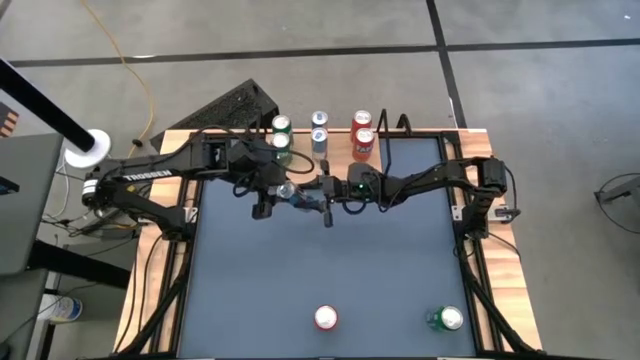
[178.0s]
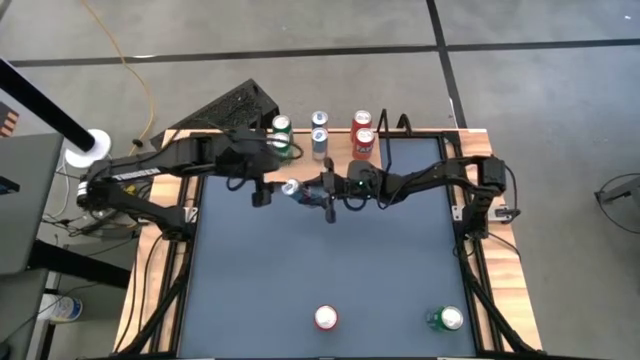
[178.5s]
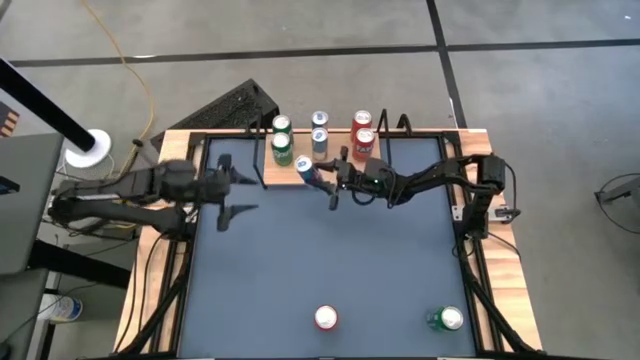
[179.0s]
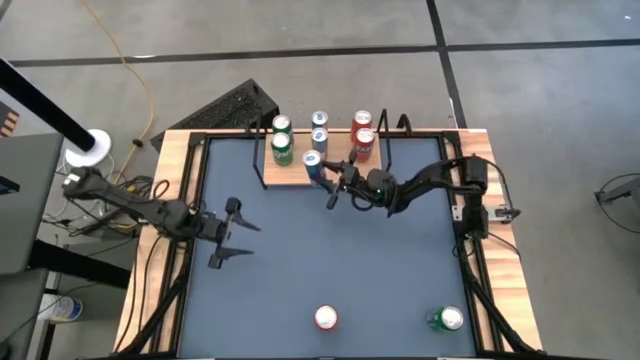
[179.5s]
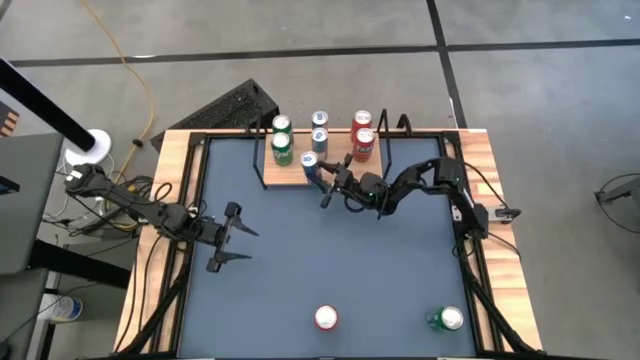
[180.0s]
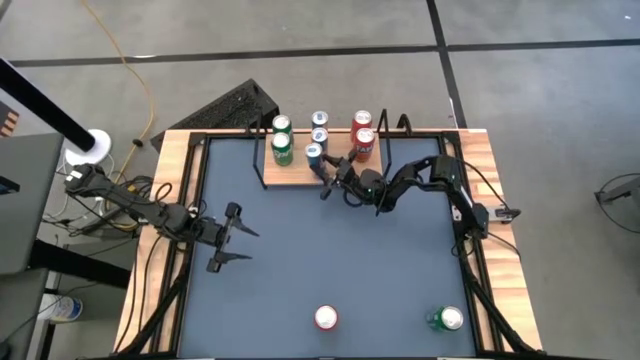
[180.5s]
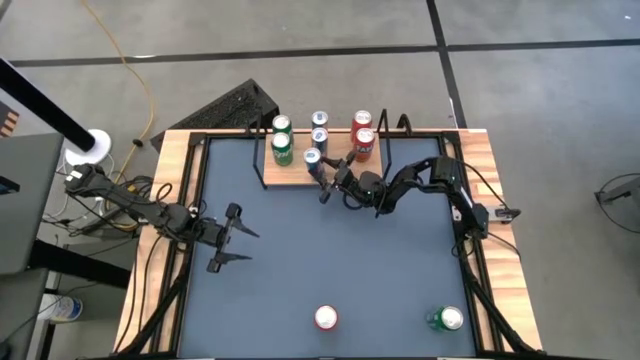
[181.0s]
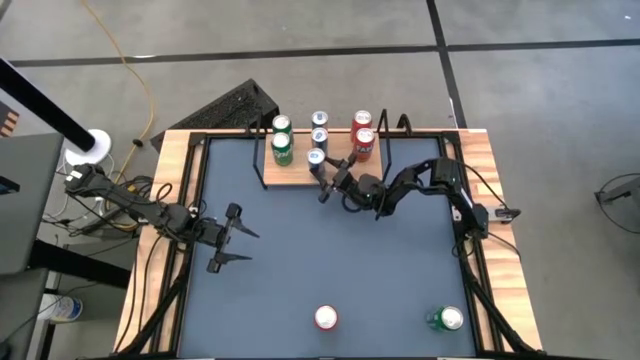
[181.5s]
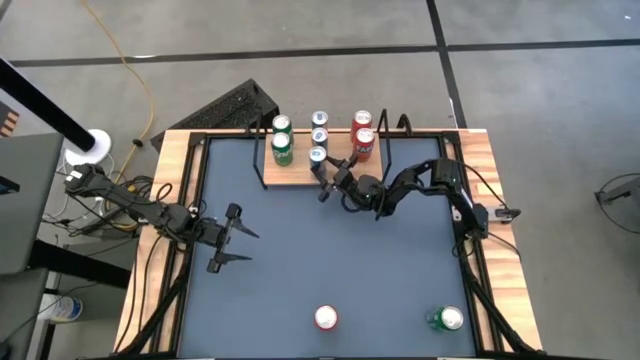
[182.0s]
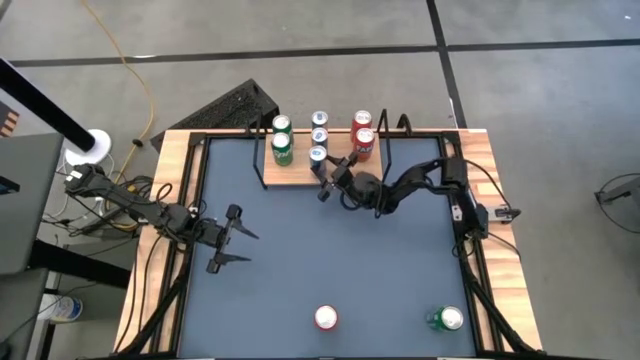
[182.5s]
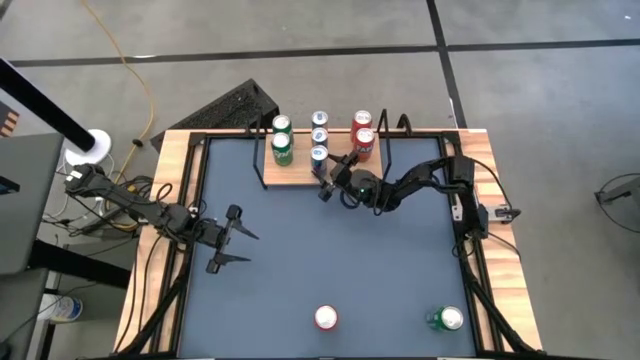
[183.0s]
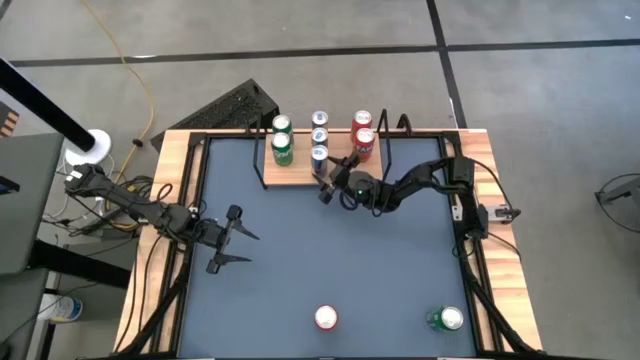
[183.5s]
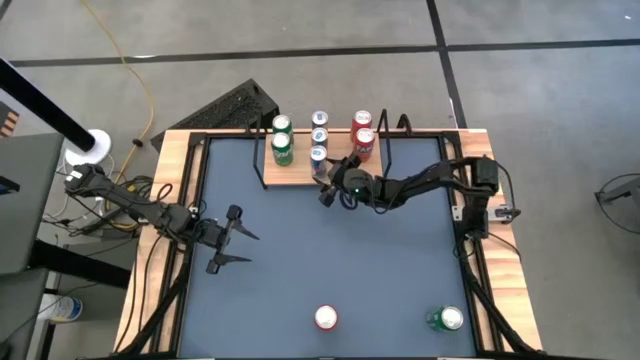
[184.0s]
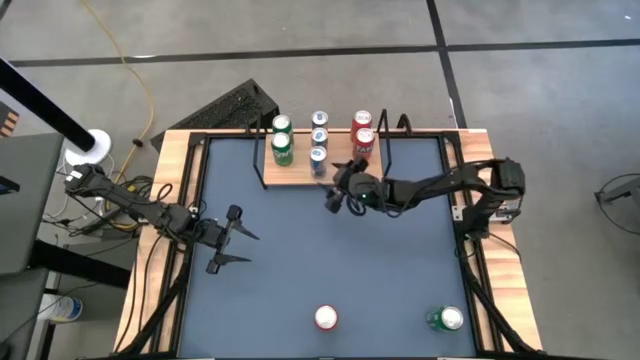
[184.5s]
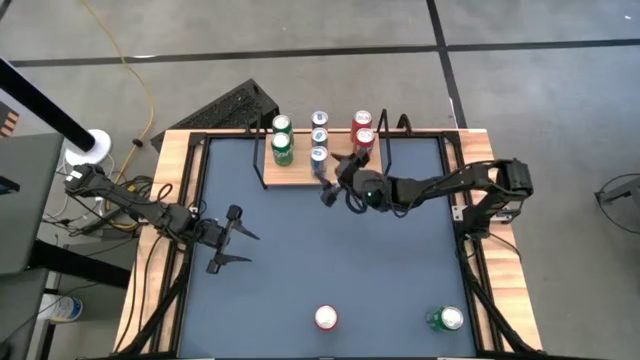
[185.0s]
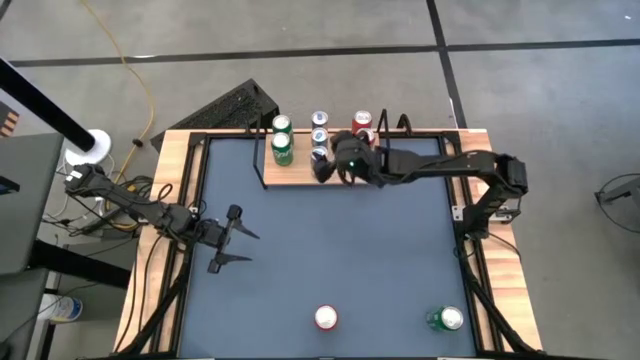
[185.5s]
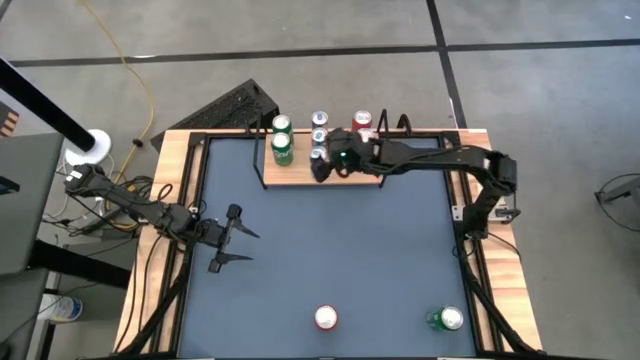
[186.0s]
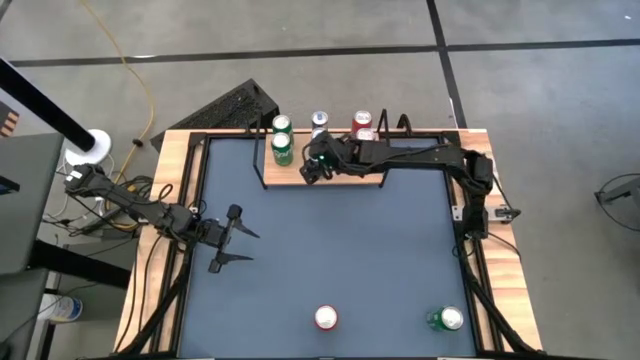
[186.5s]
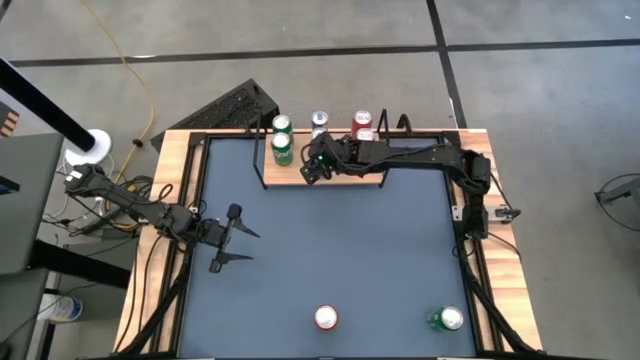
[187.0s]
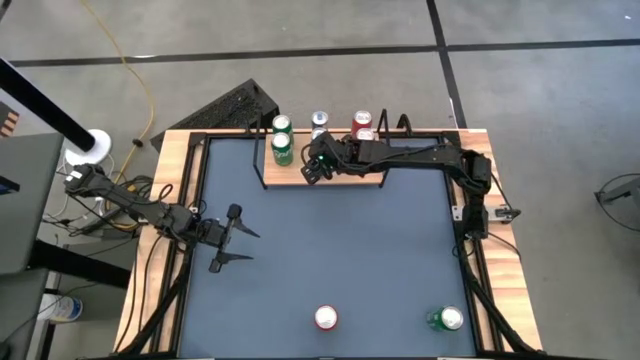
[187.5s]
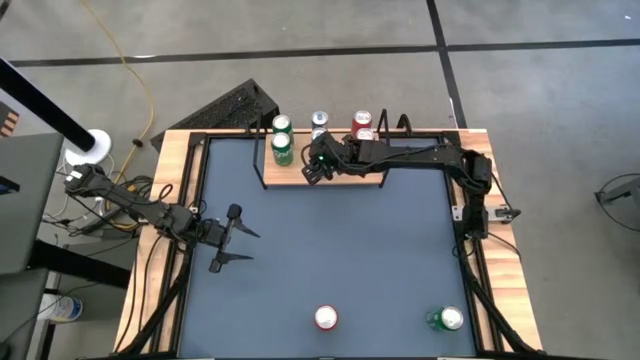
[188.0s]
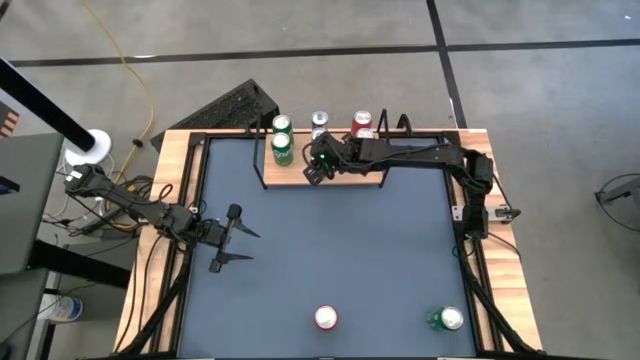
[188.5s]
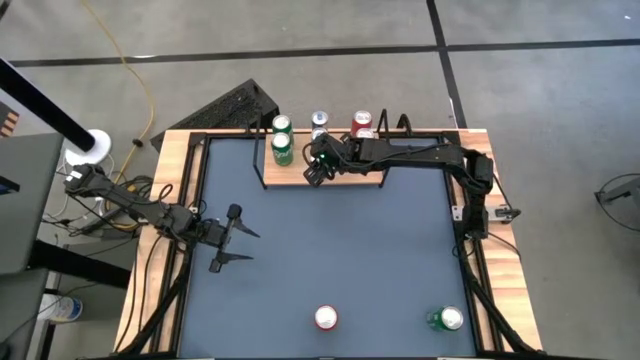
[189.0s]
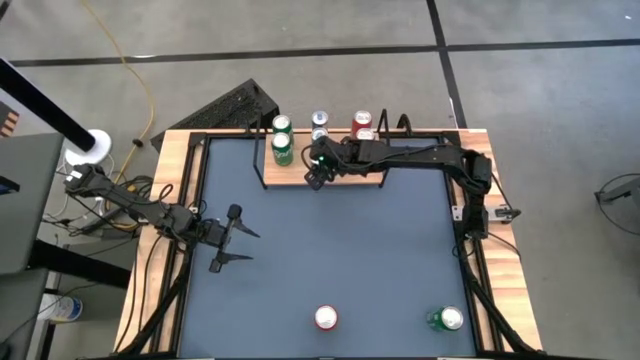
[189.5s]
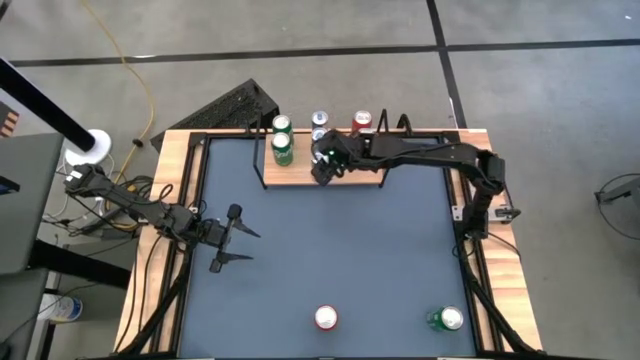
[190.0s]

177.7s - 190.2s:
Task: Place canned beverage on shelf
Put the blue soda can on the shelf aligned with the other blue soda cans

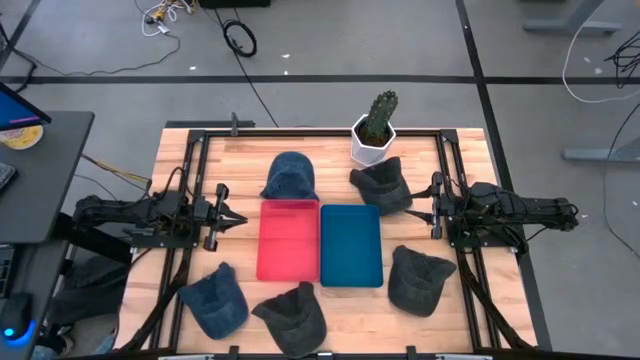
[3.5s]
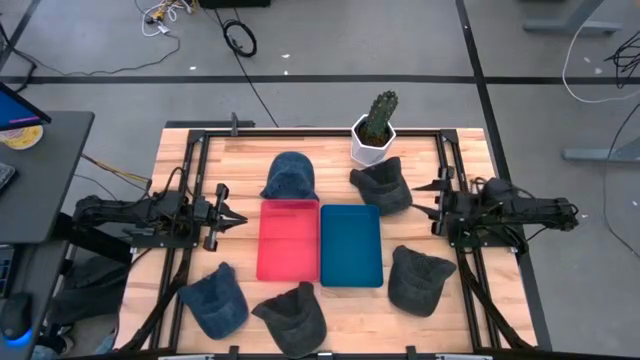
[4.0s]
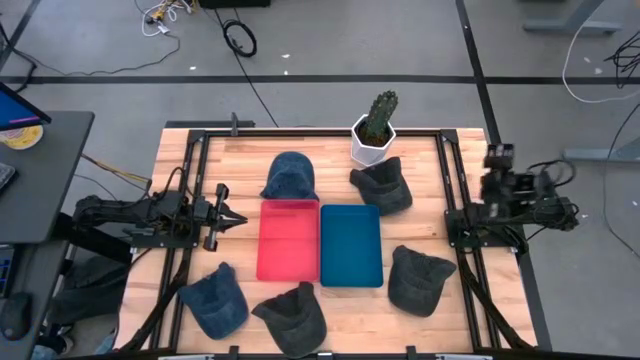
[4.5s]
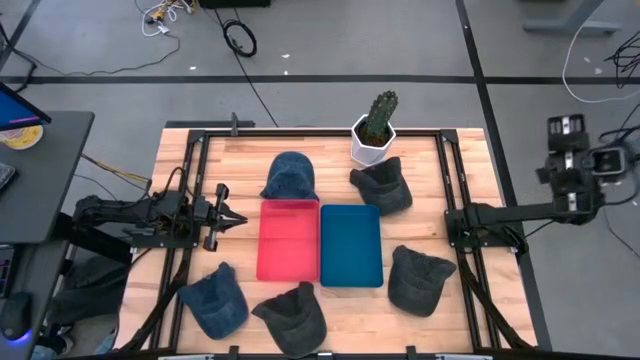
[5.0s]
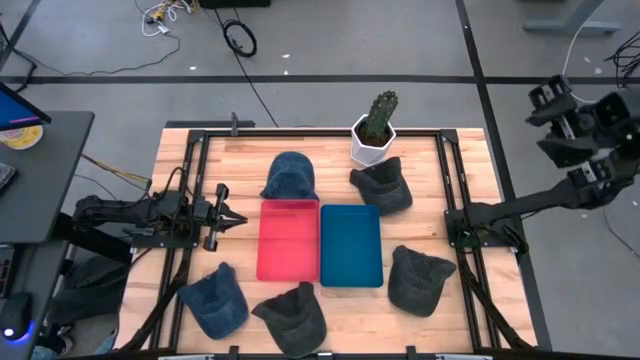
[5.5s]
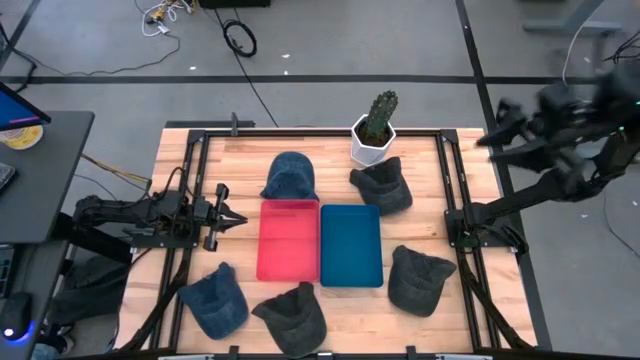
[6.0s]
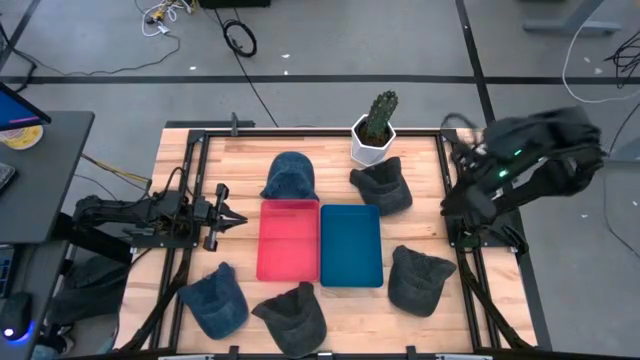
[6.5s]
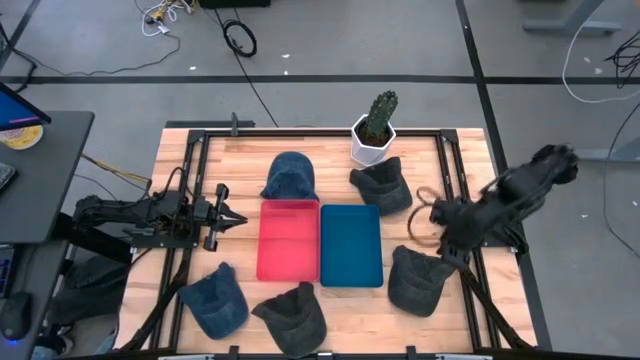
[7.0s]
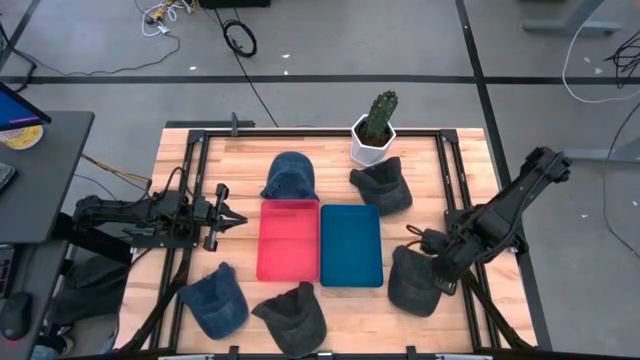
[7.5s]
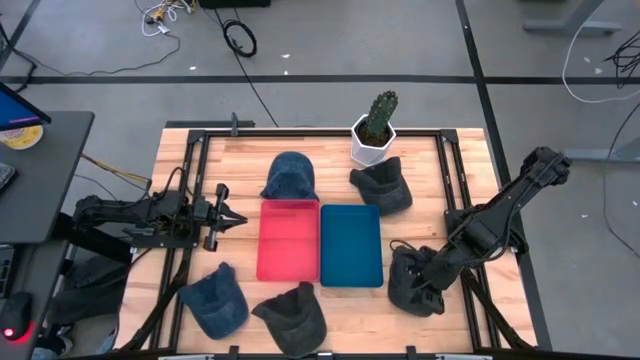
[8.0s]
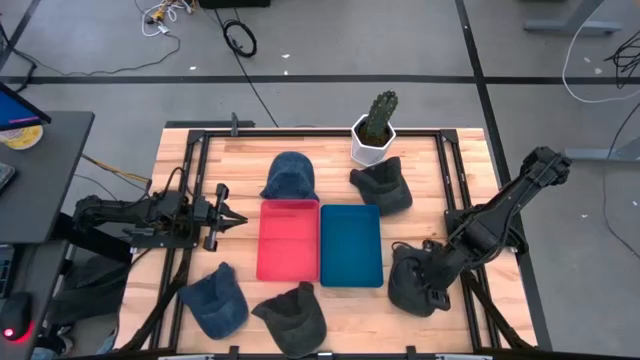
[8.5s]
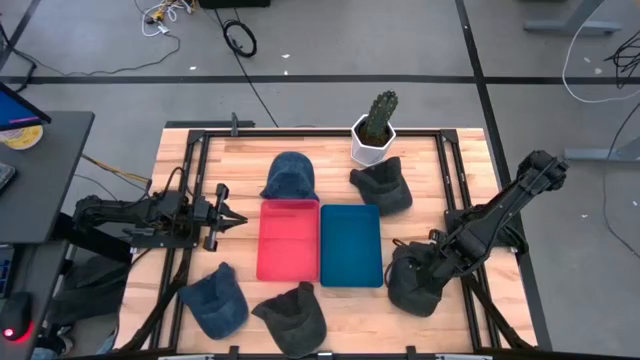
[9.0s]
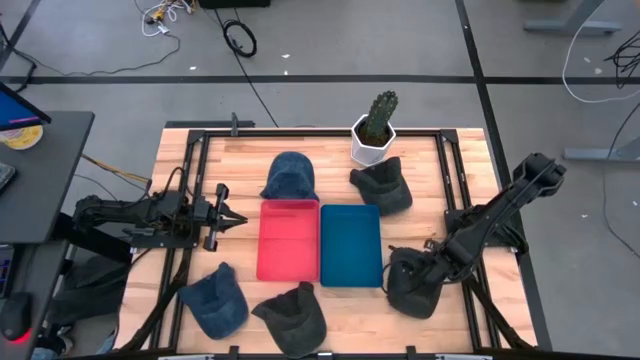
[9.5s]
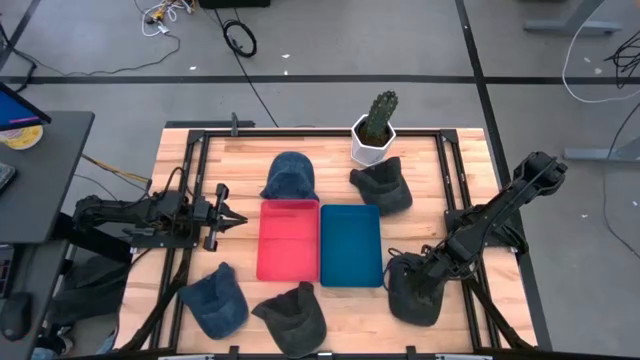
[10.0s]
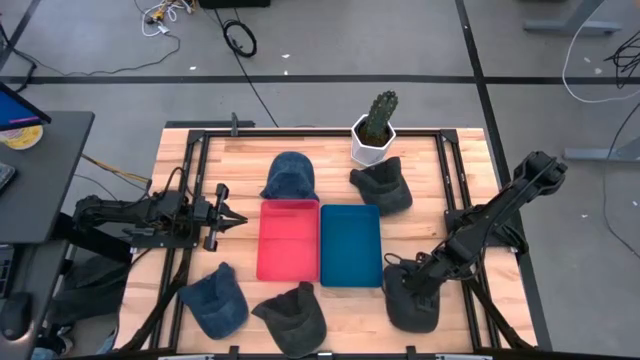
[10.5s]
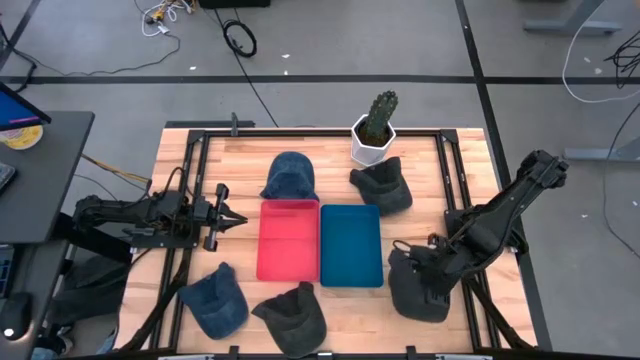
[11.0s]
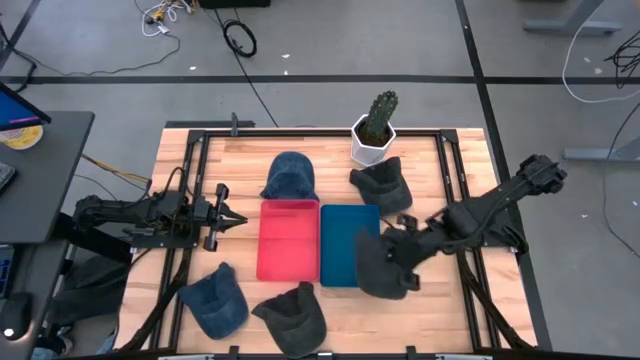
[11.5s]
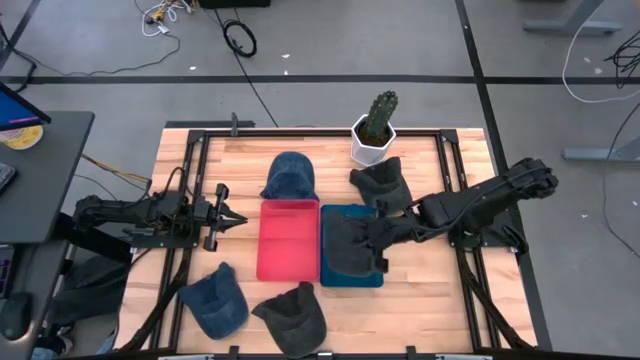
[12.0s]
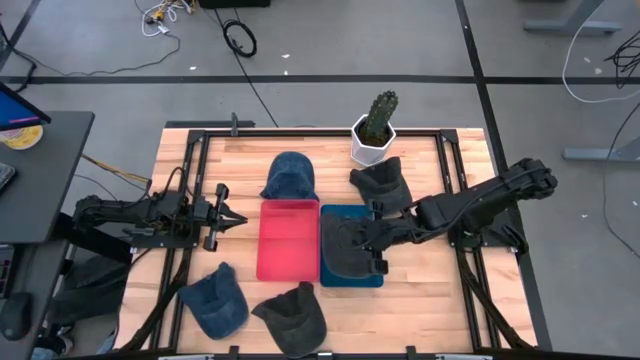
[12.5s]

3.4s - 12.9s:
Task: Pick & Place hat
Put the bottom right gray cap into the blue bin
